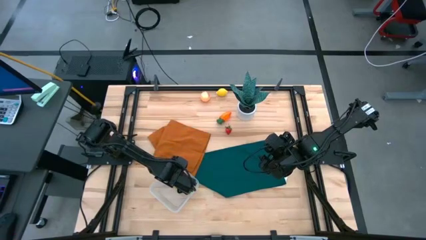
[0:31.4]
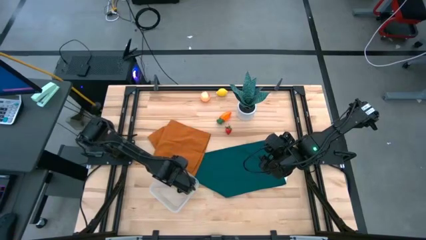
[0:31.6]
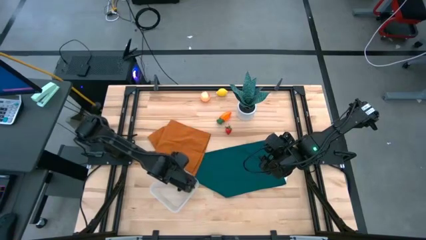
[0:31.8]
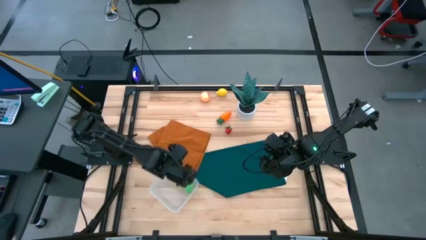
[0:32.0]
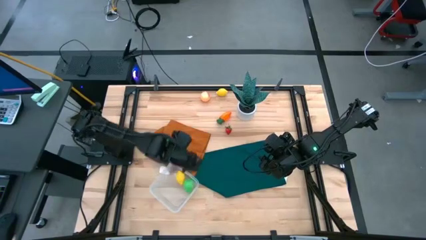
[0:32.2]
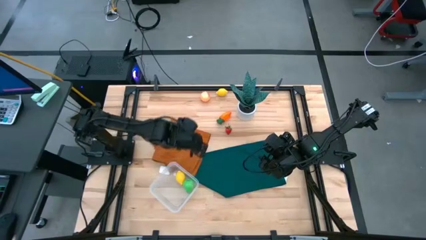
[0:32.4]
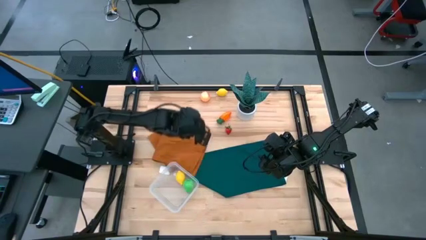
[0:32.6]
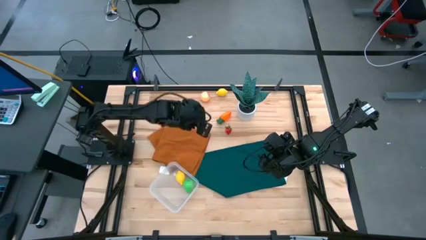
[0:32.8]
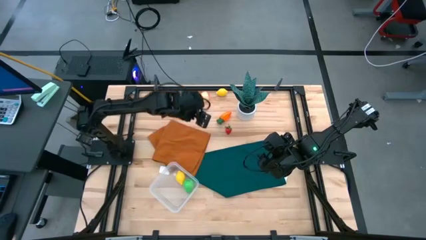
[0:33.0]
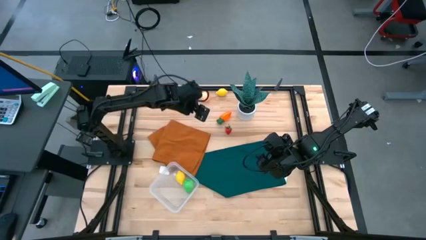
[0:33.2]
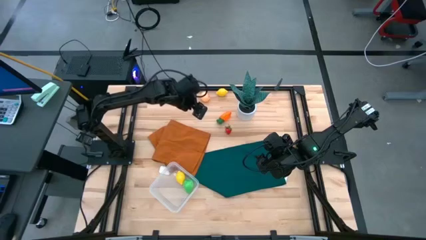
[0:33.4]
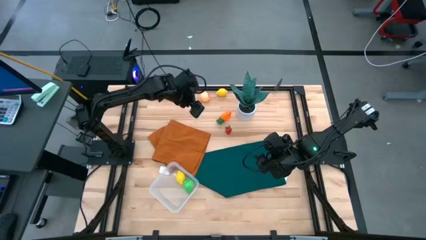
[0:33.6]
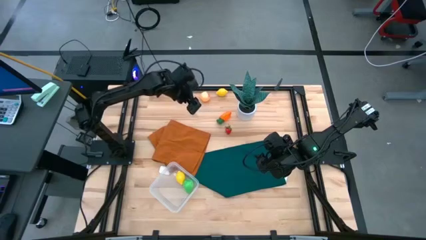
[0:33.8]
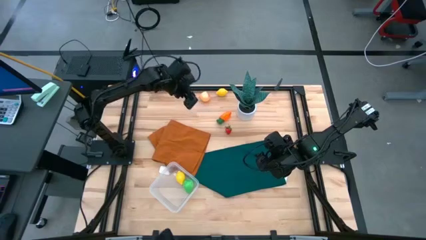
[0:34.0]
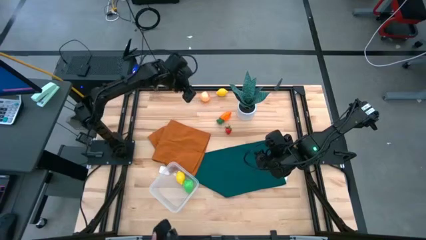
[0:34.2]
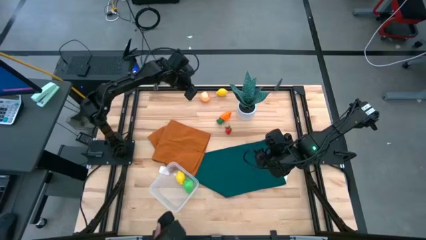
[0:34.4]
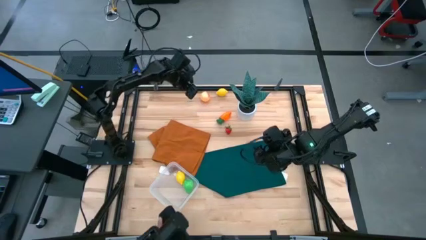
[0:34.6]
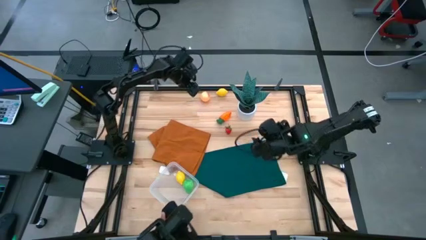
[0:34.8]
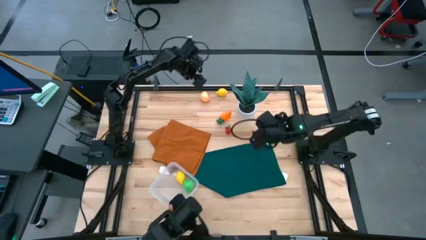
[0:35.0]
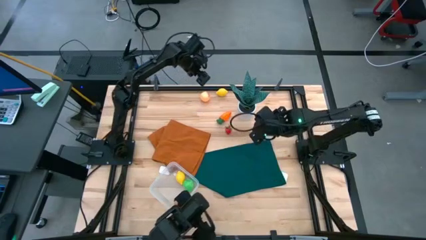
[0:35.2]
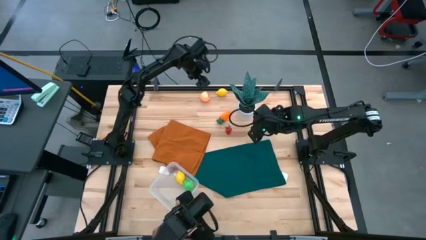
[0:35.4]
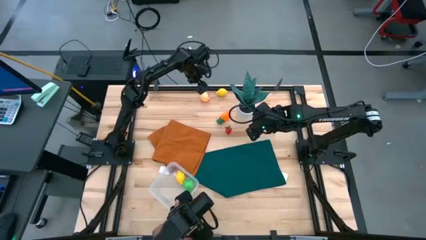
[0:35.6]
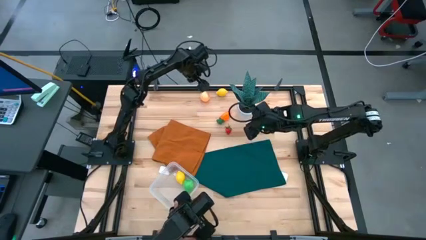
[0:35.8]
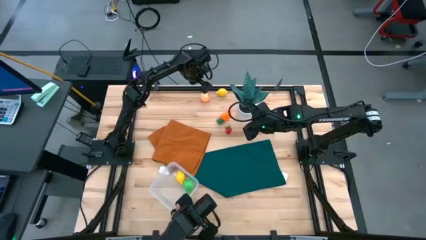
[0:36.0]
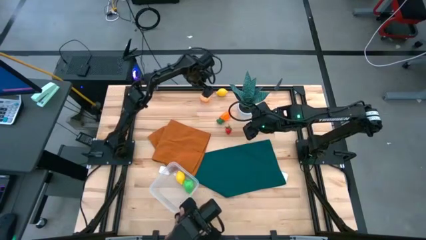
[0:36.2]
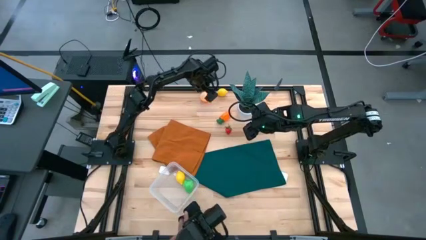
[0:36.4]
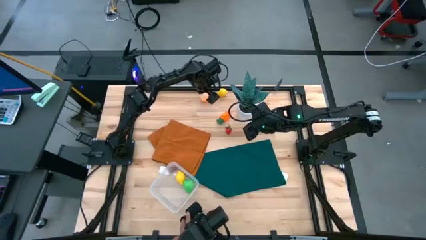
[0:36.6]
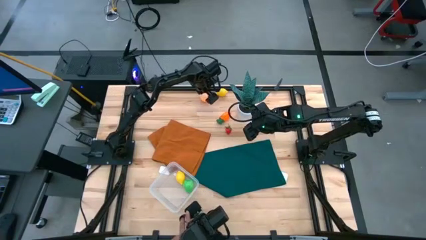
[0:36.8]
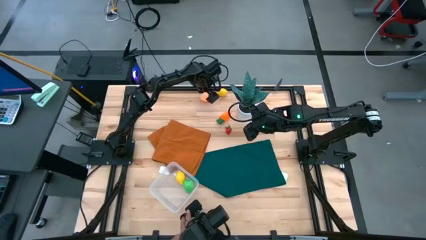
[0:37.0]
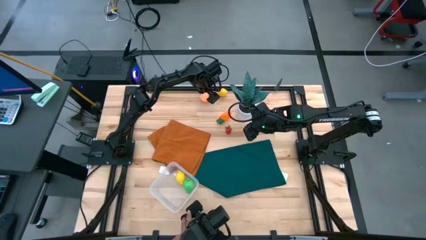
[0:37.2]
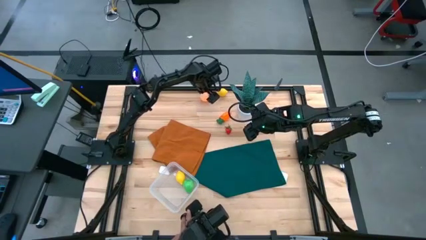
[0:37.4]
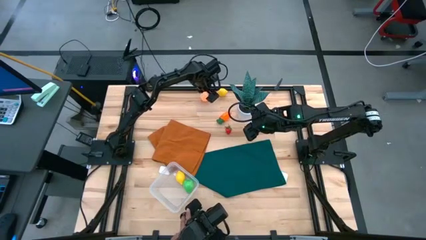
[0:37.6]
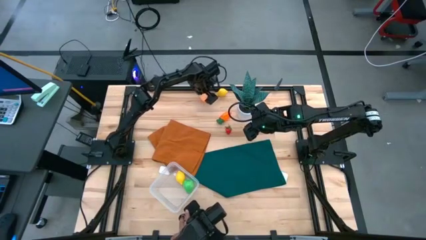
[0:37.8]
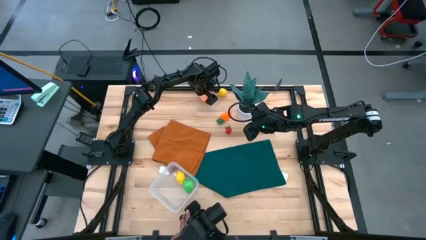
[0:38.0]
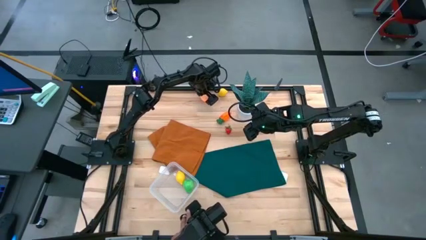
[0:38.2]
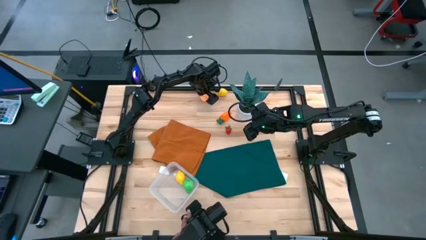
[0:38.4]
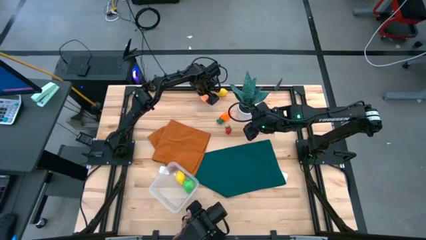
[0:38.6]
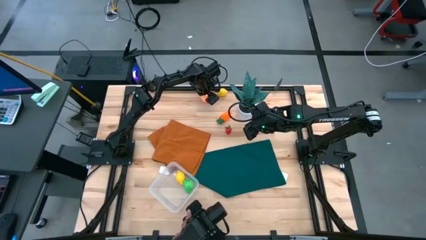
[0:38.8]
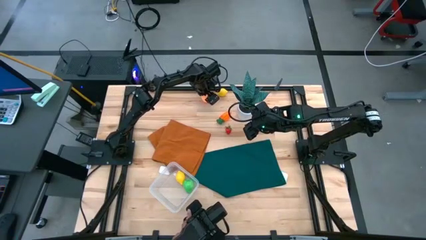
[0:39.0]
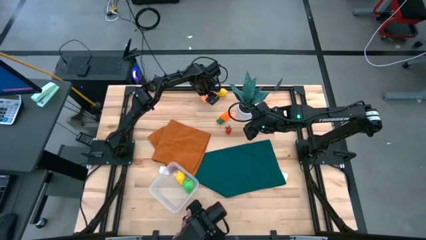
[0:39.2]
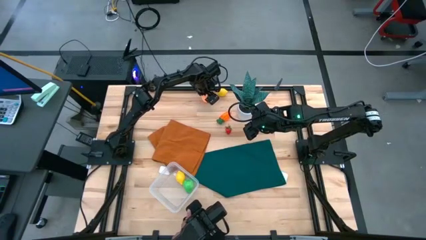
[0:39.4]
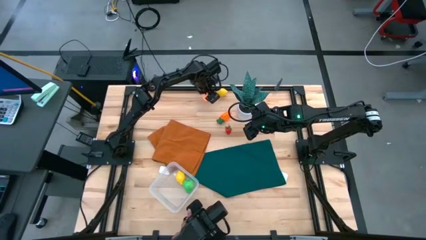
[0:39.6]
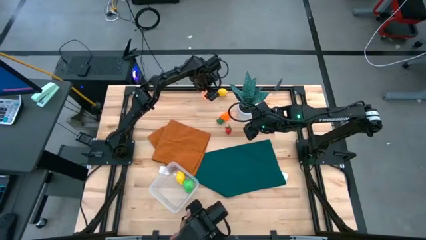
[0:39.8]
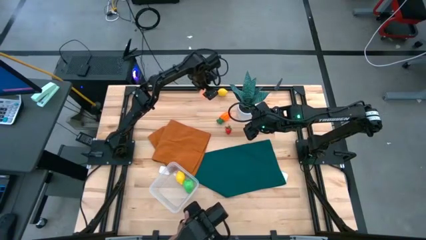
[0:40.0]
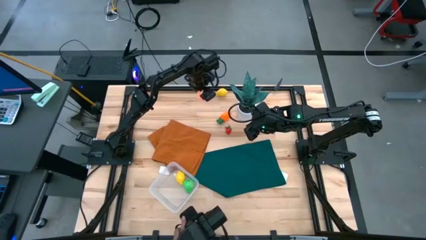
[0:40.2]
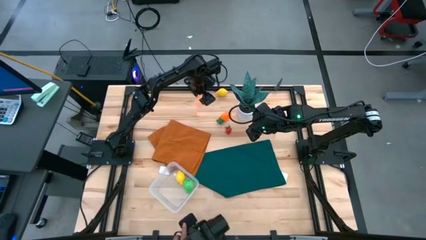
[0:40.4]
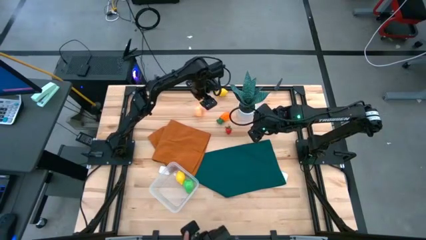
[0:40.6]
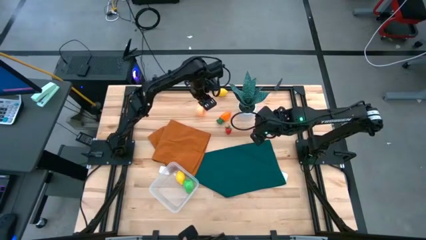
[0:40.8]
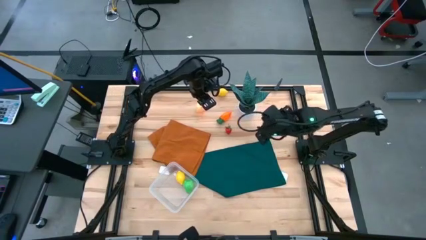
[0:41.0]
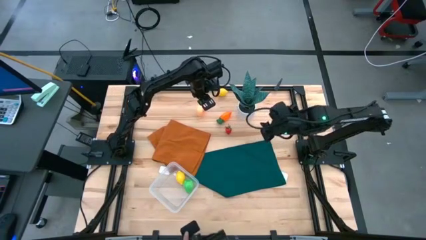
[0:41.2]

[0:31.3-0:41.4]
Task: Pick and placing Produce into tupperware
Put the peach into the transparent container
